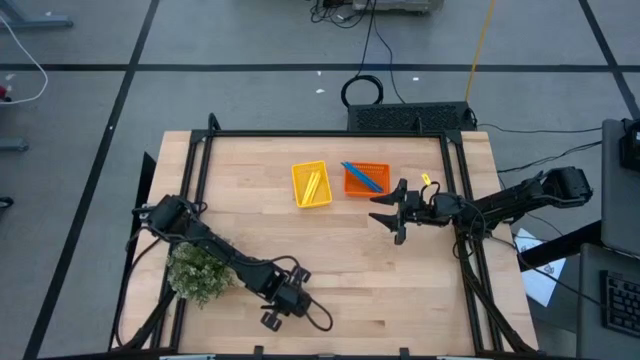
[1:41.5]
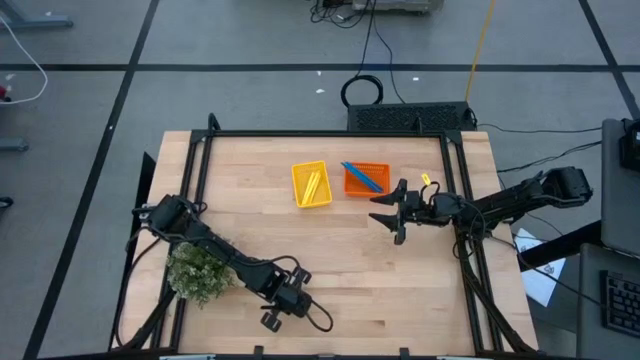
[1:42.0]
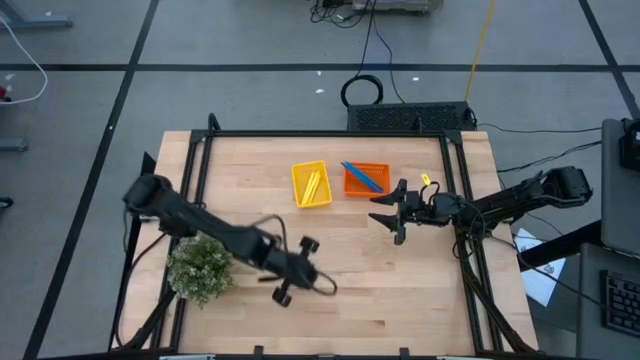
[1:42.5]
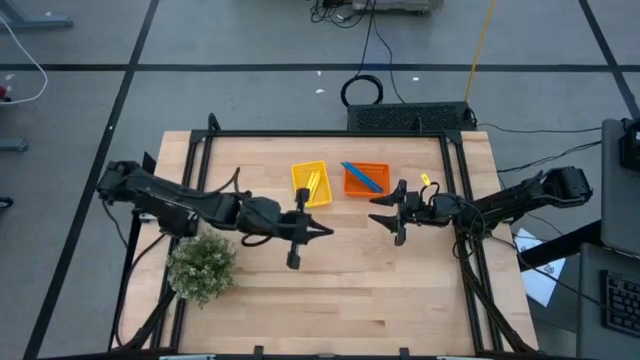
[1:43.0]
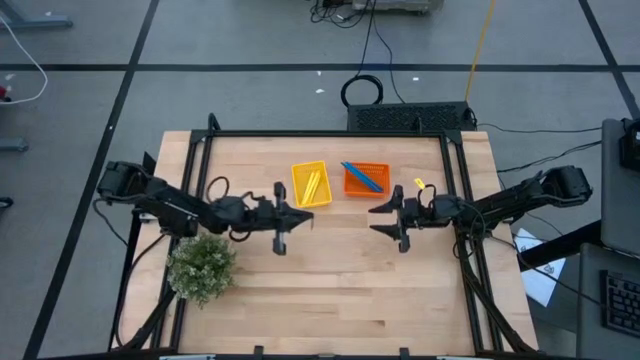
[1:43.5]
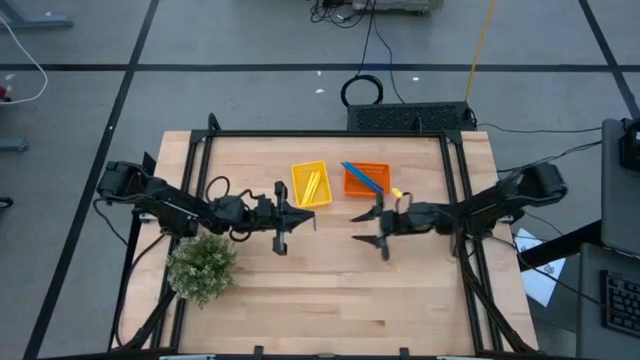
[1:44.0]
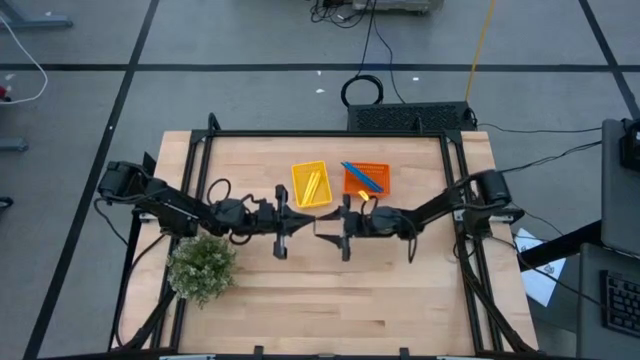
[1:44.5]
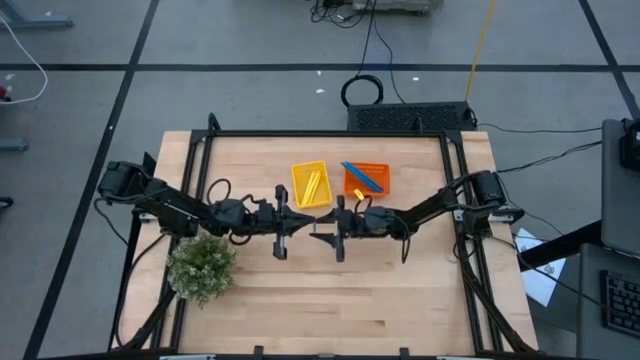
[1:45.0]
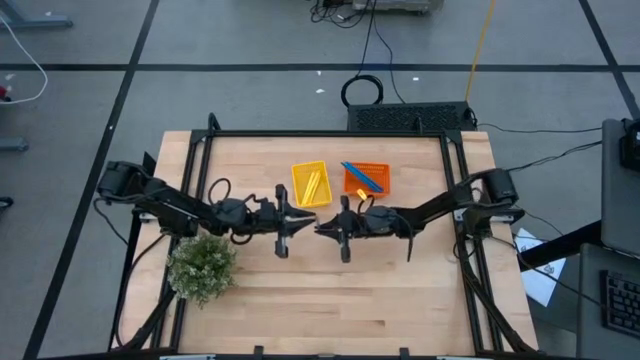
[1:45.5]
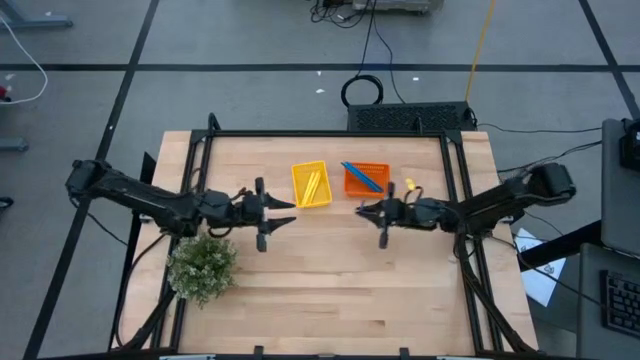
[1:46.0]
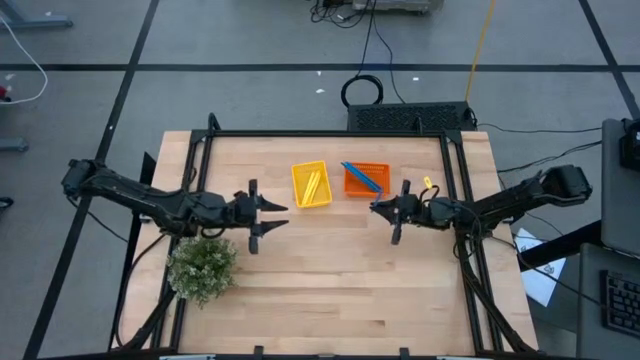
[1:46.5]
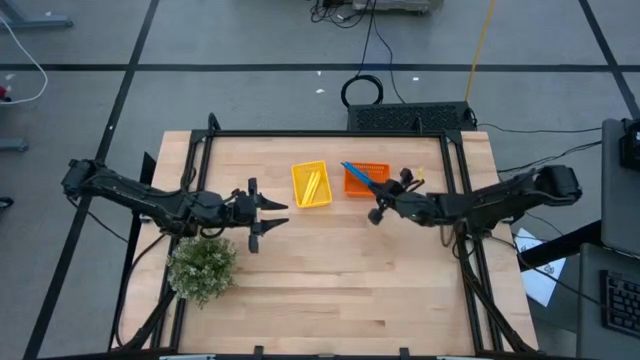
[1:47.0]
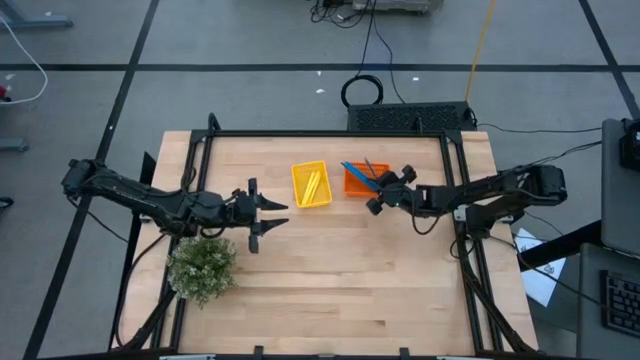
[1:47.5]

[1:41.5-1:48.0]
Task: Sort pens & pencils
Put the blue pencil into the orange basket

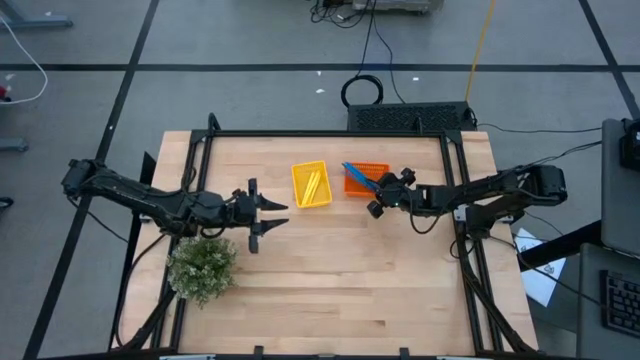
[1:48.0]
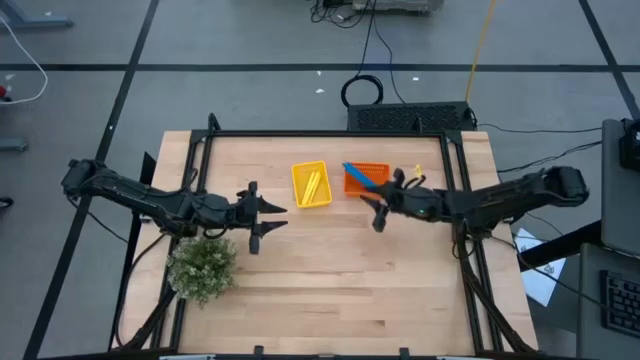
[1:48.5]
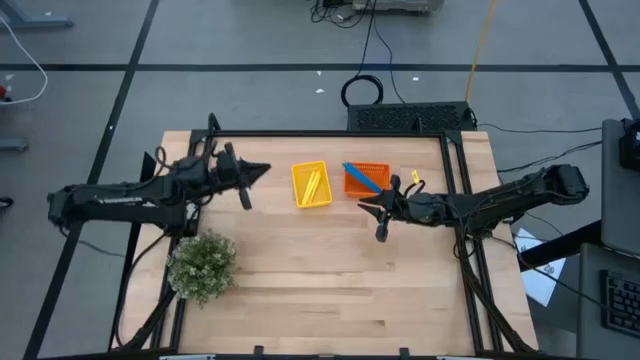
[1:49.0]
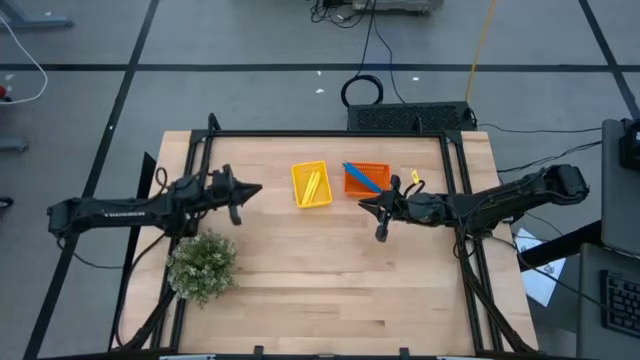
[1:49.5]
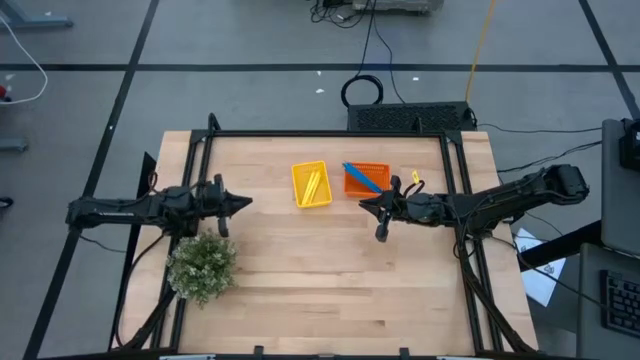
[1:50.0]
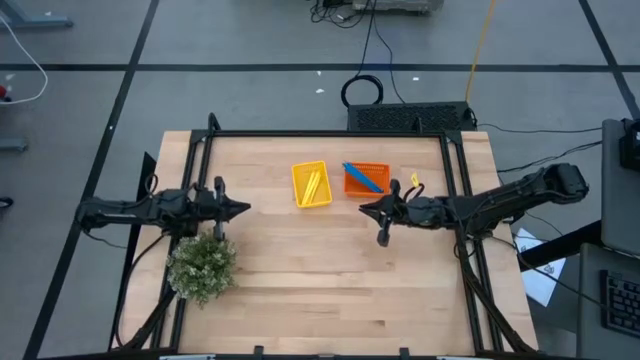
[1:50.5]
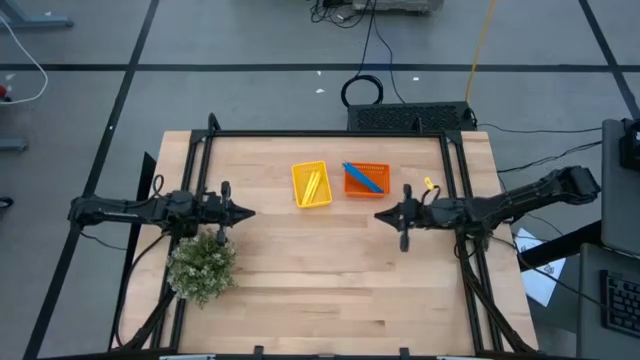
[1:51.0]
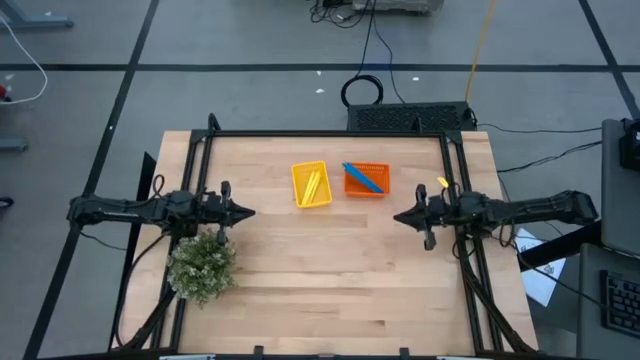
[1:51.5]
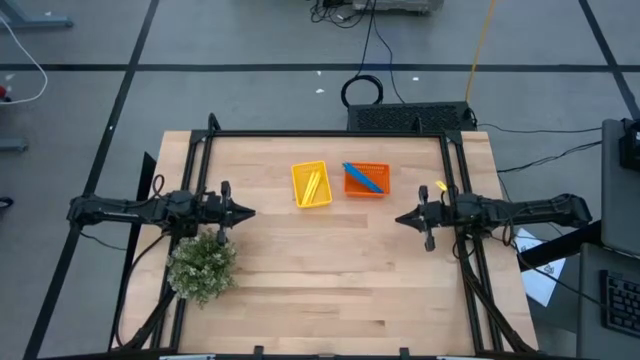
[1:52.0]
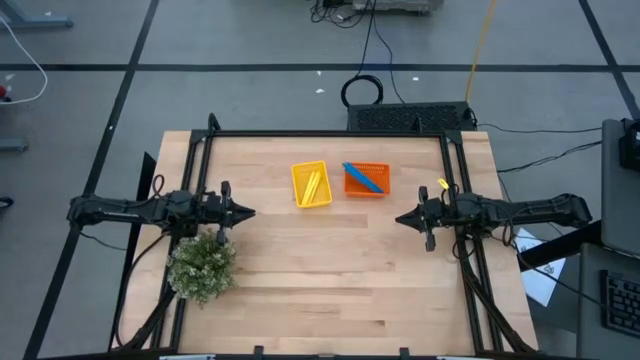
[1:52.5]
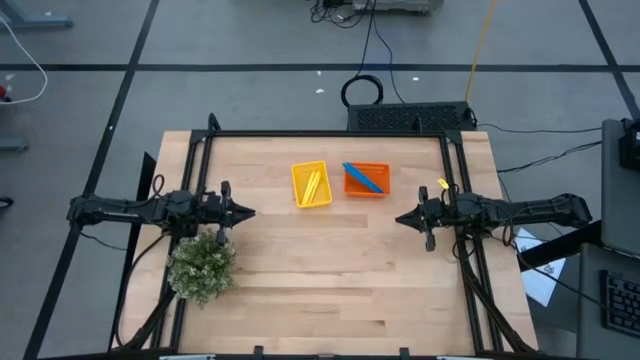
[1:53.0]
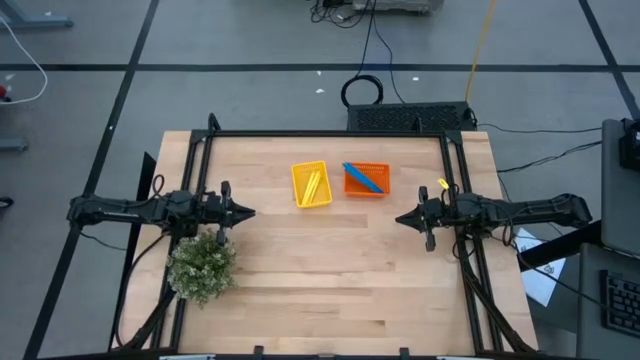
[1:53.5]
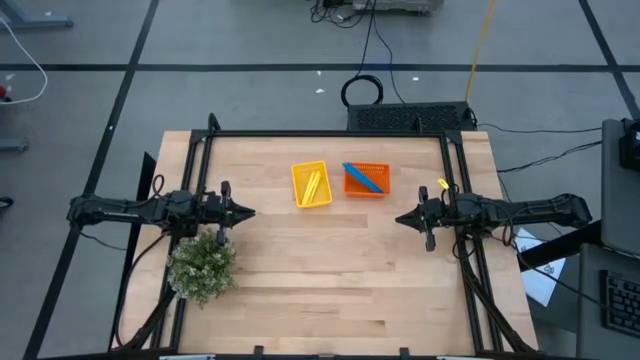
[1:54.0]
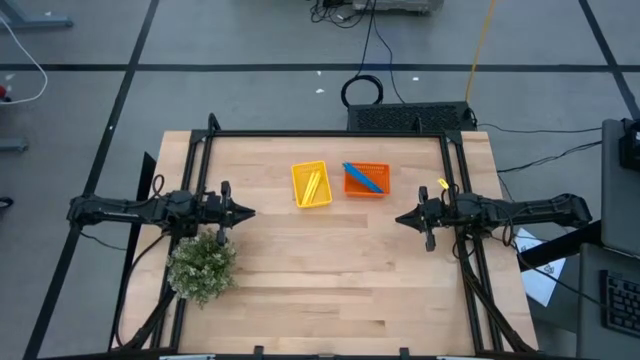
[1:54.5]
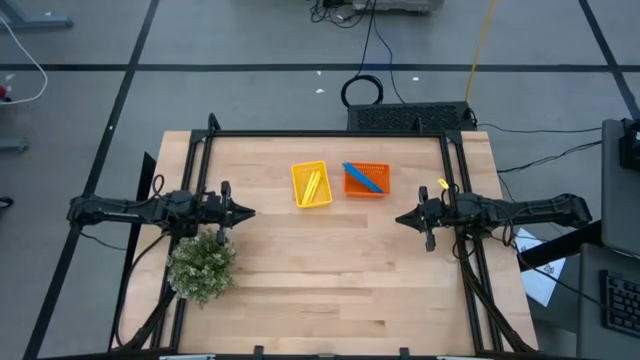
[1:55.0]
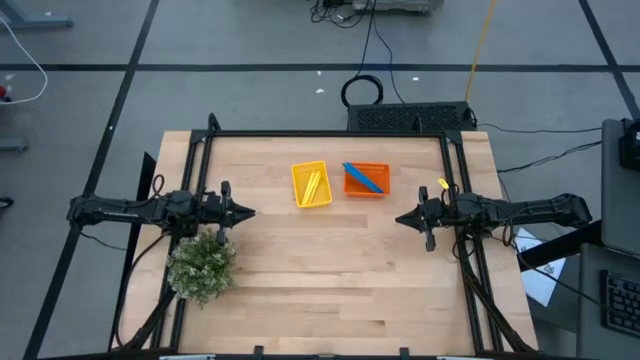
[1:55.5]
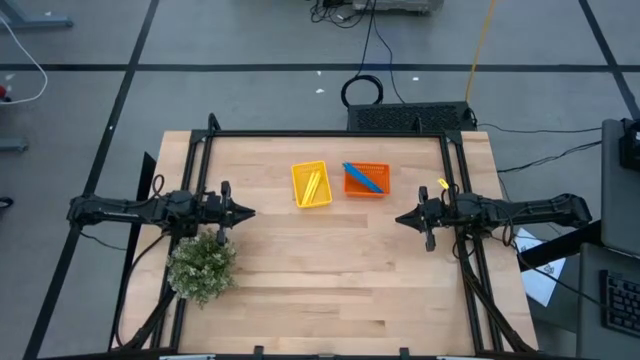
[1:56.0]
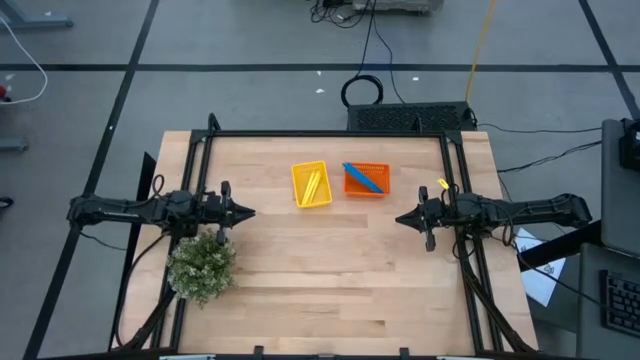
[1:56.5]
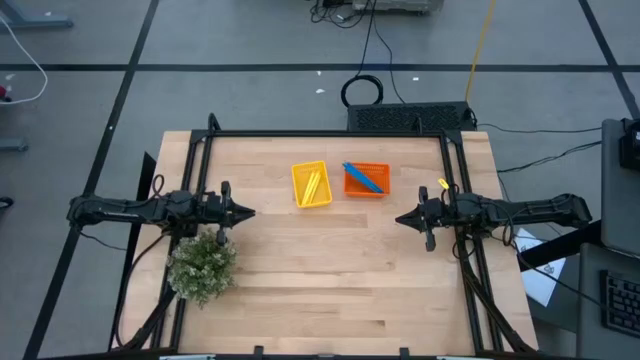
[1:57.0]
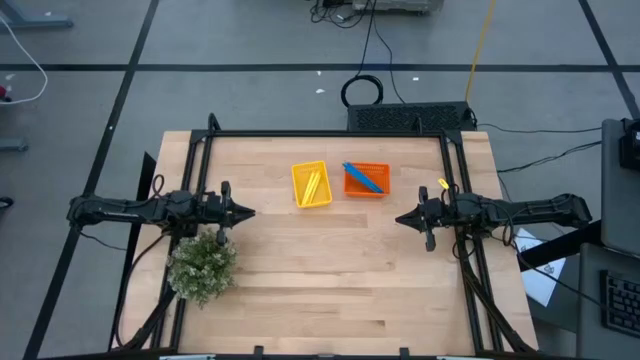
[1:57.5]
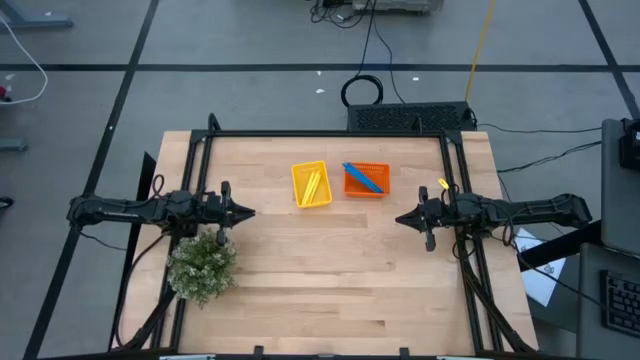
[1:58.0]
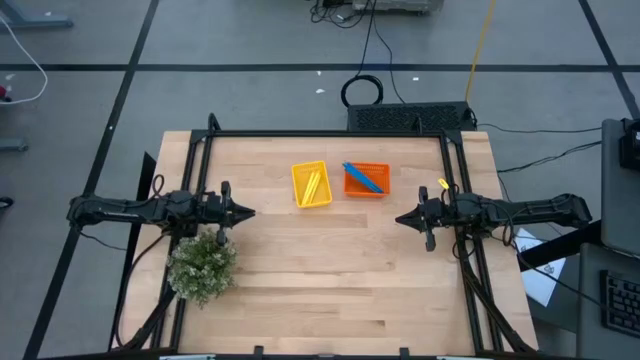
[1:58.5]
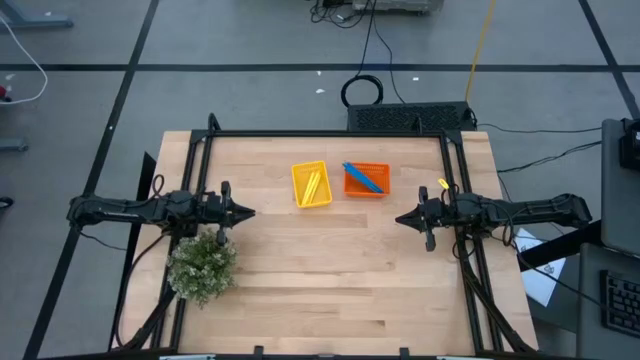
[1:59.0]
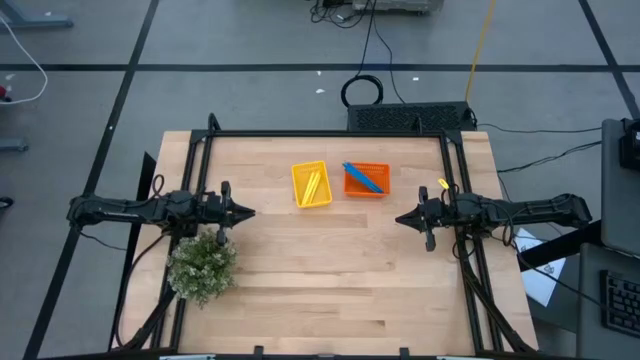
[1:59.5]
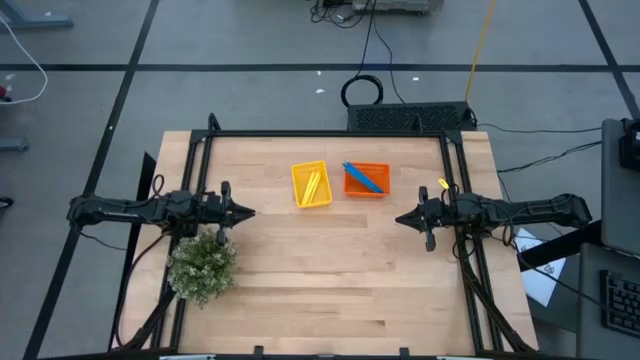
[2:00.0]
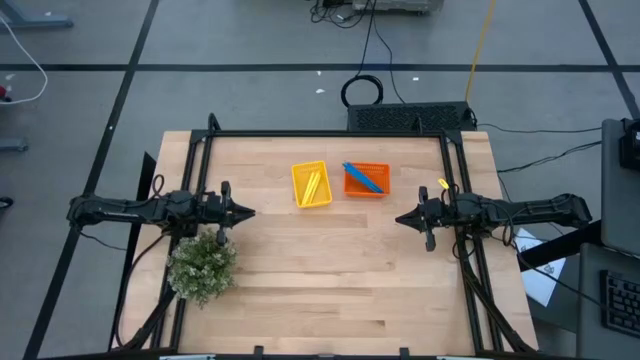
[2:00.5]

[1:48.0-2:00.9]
Return to Home Position

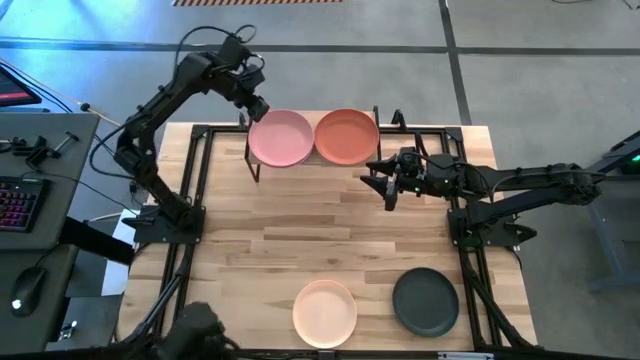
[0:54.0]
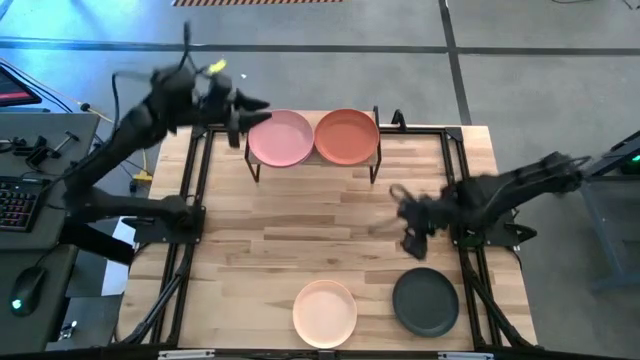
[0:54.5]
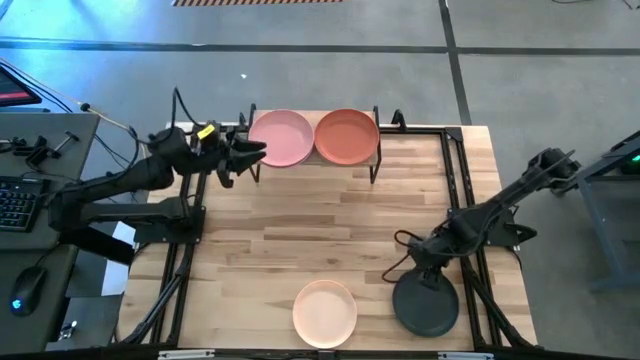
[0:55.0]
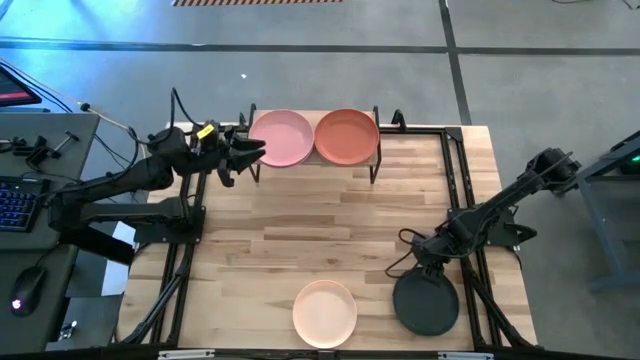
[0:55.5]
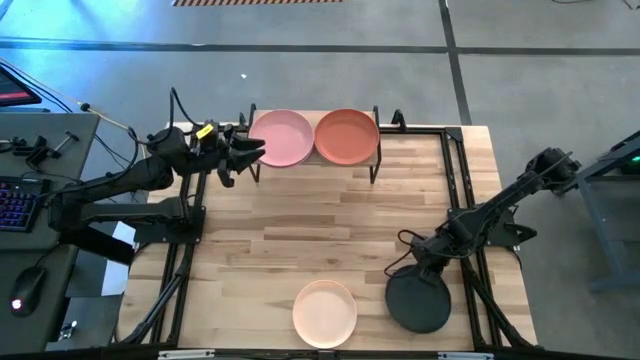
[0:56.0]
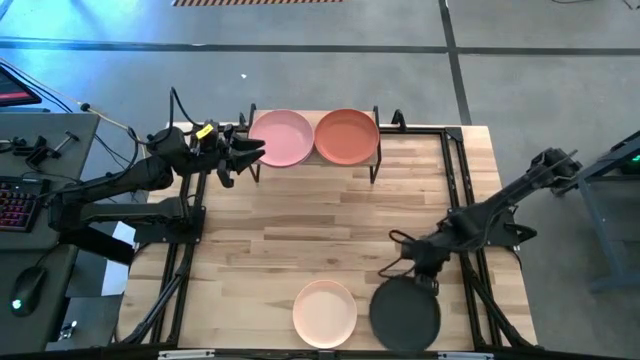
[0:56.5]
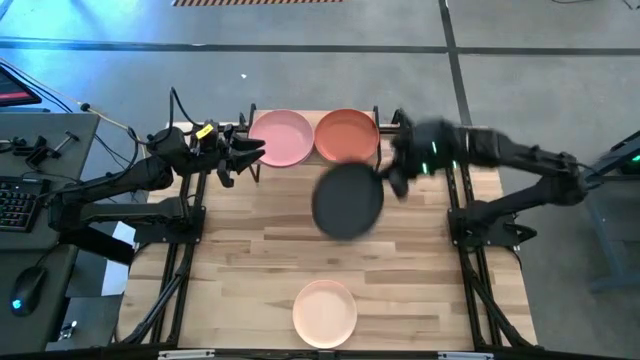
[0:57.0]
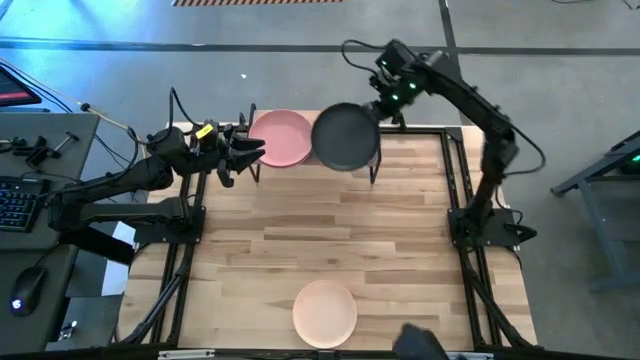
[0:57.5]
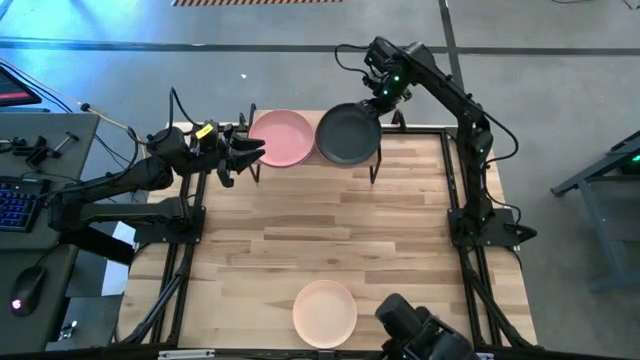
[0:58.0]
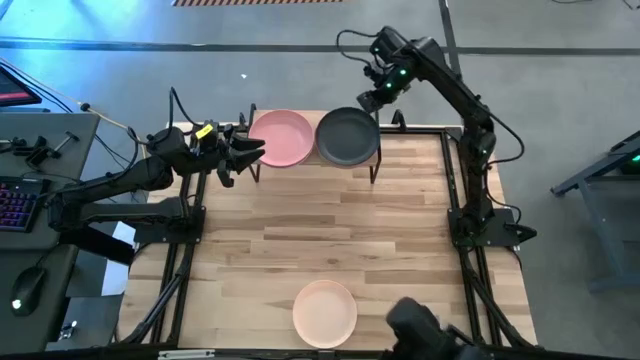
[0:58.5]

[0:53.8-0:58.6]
Task: Place and stack plates onto a shelf
Stack the black plate on top of the orange plate on the shelf
